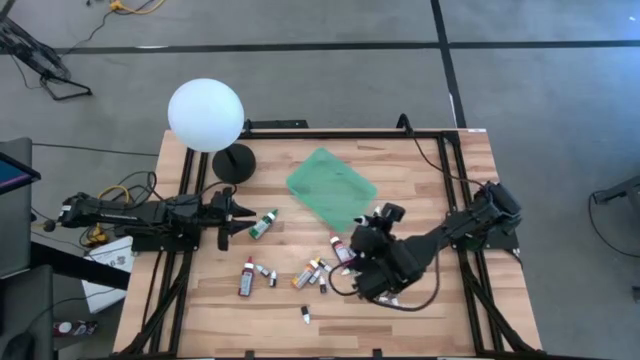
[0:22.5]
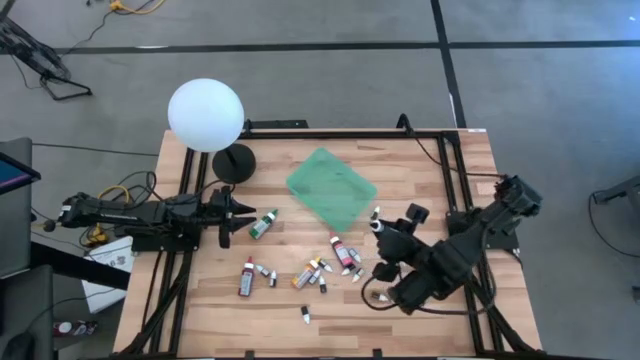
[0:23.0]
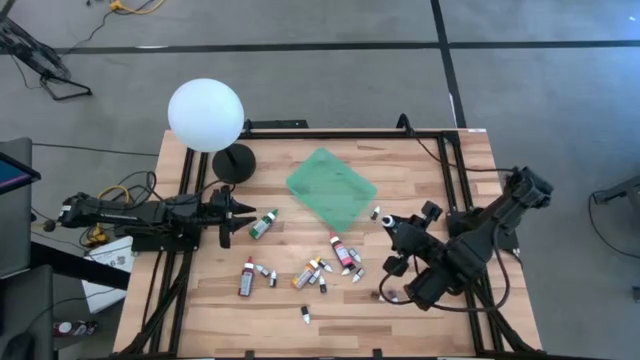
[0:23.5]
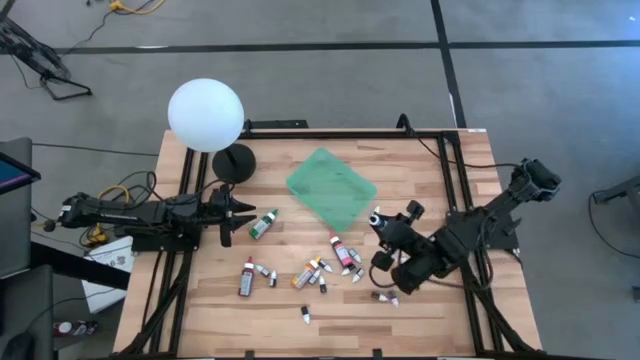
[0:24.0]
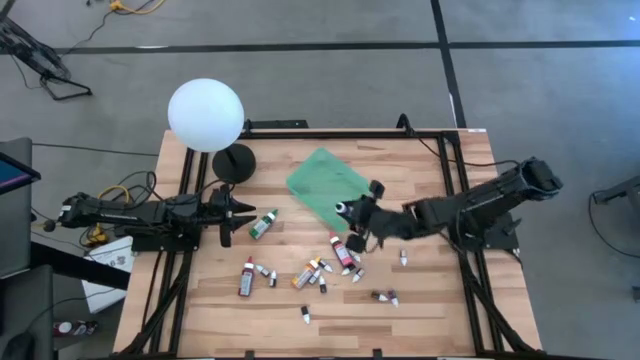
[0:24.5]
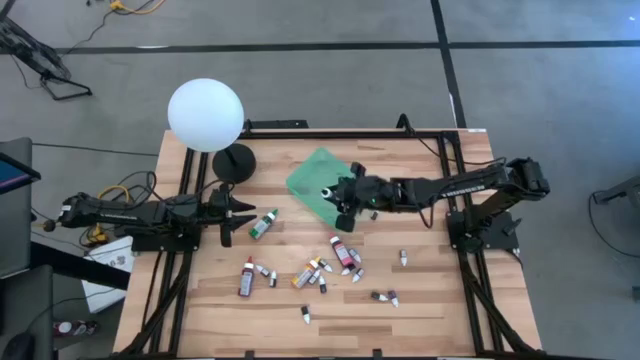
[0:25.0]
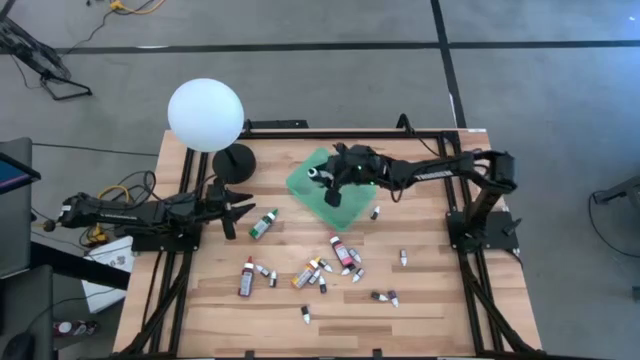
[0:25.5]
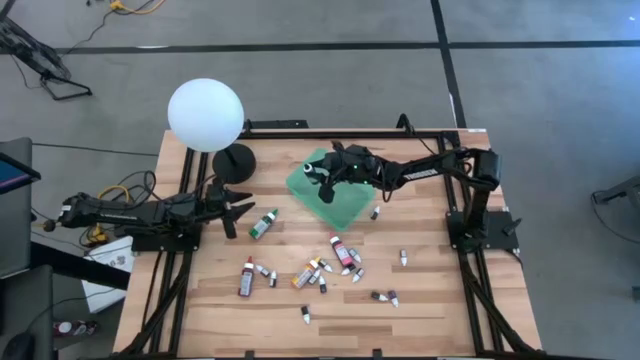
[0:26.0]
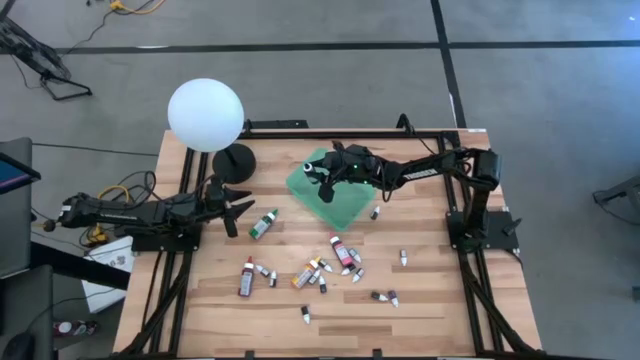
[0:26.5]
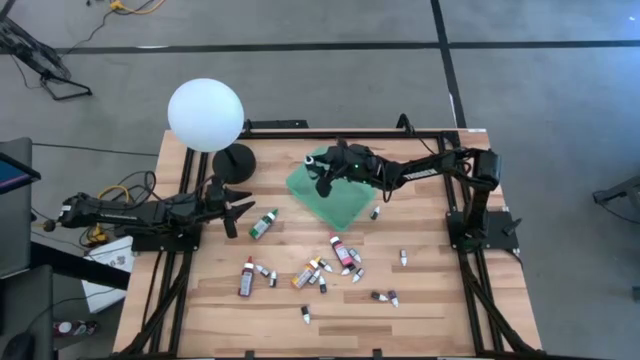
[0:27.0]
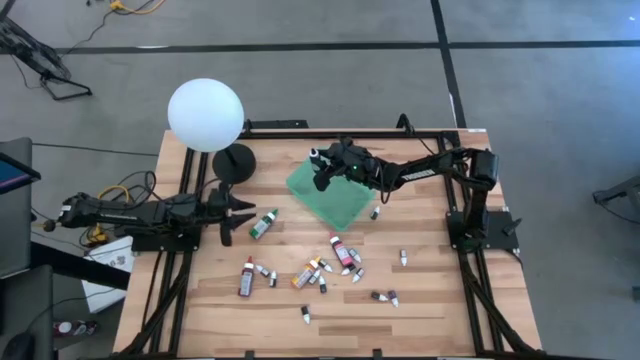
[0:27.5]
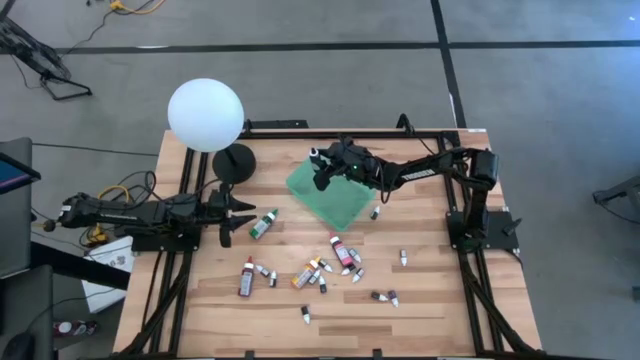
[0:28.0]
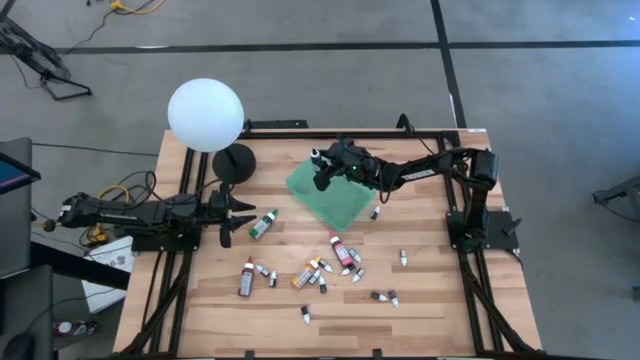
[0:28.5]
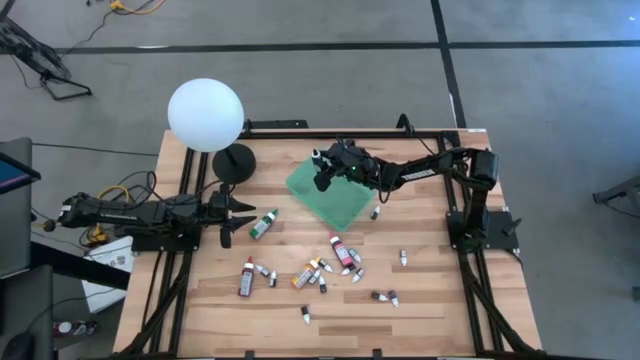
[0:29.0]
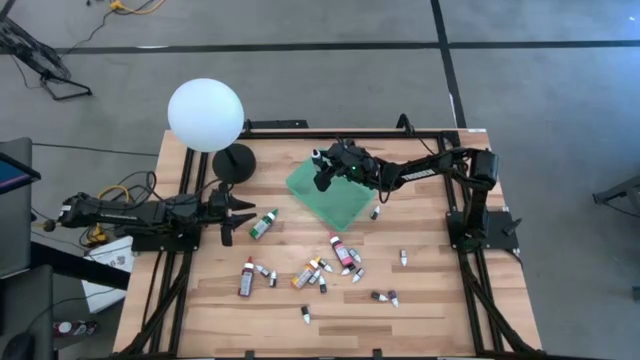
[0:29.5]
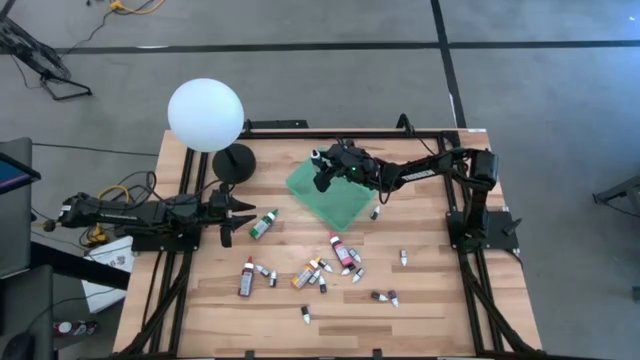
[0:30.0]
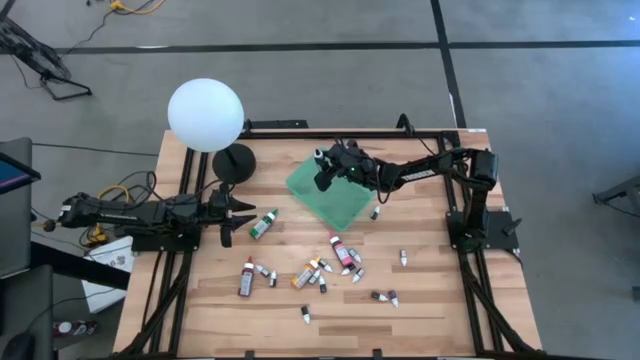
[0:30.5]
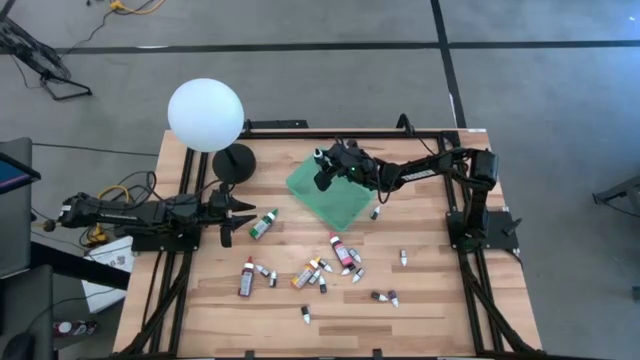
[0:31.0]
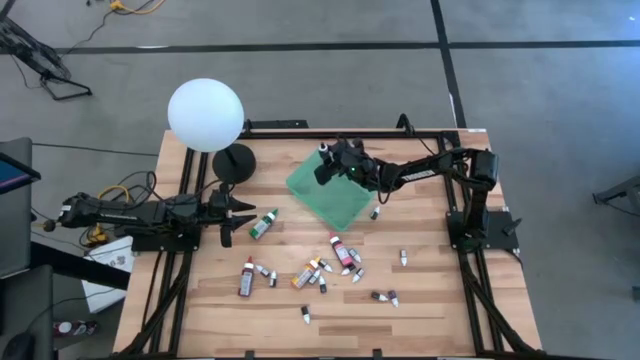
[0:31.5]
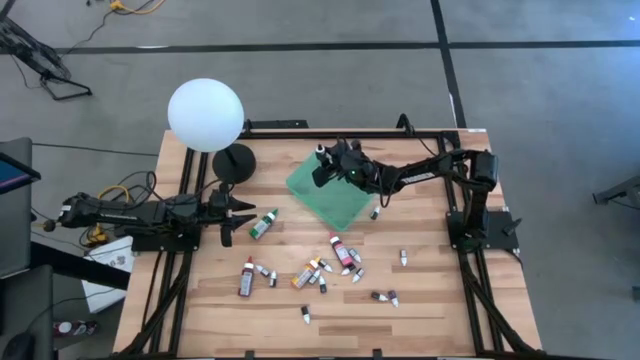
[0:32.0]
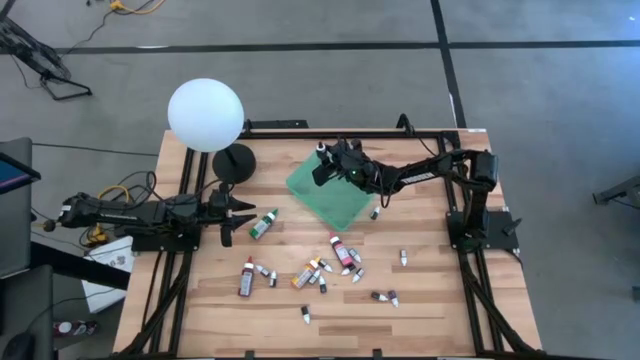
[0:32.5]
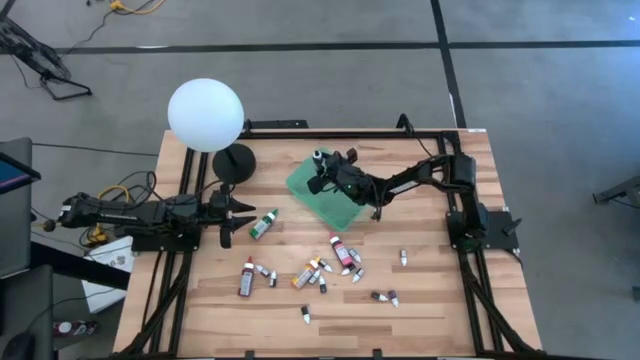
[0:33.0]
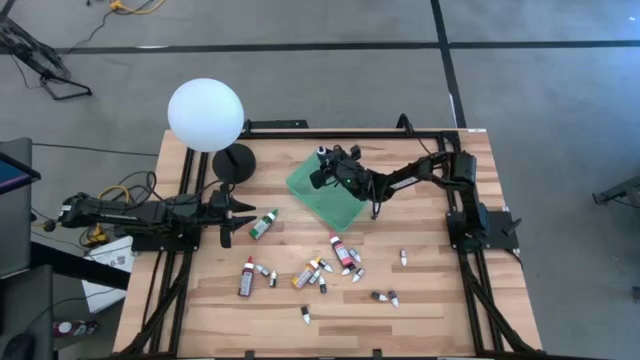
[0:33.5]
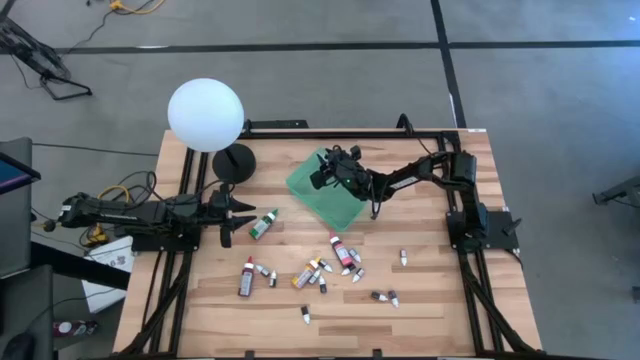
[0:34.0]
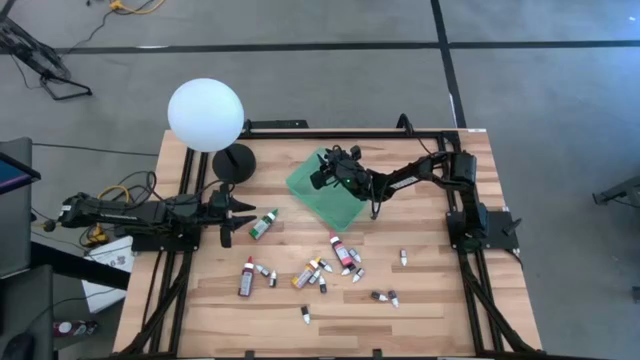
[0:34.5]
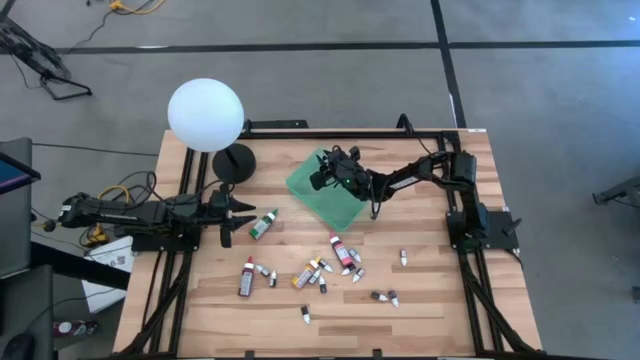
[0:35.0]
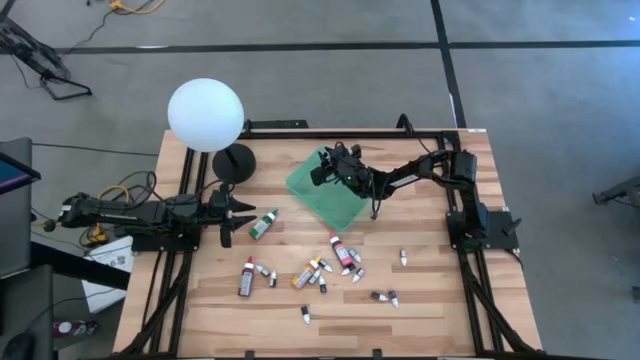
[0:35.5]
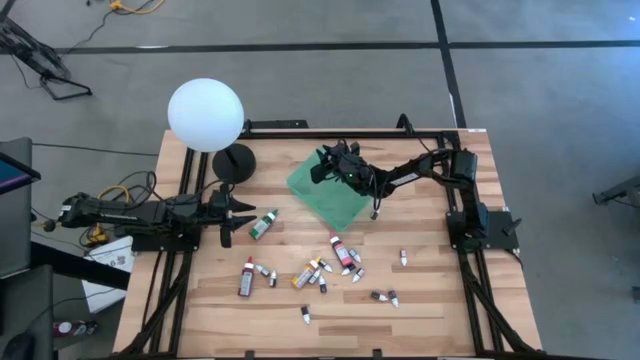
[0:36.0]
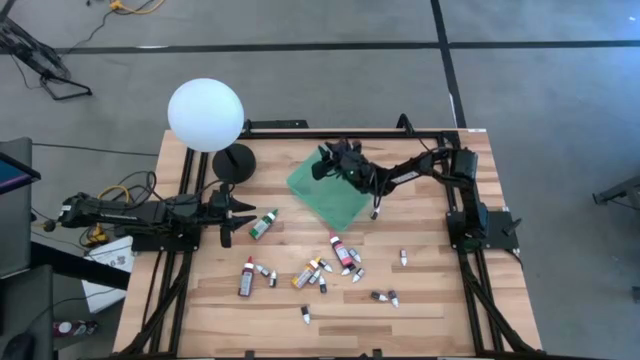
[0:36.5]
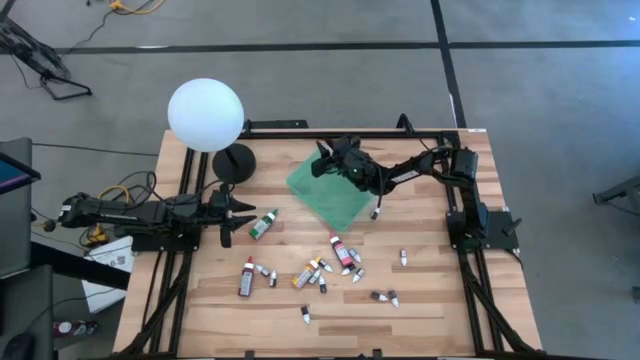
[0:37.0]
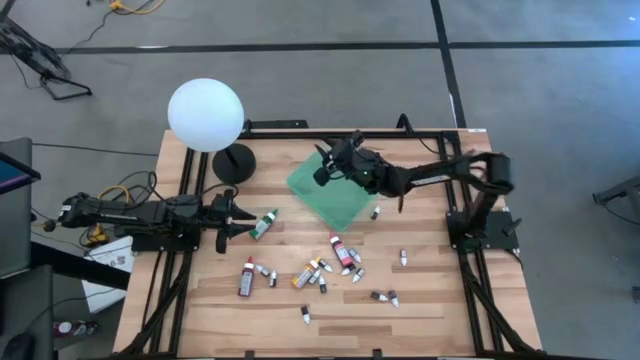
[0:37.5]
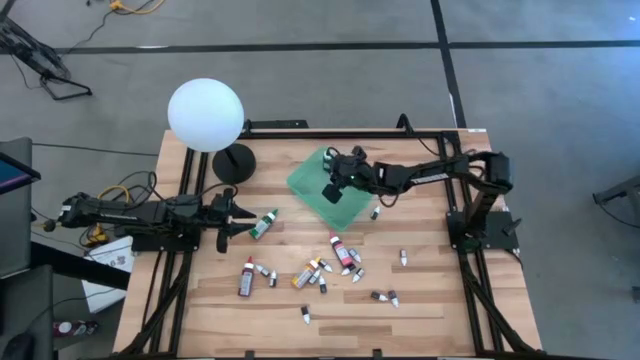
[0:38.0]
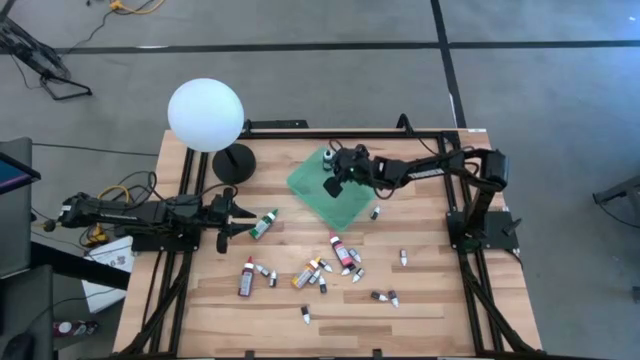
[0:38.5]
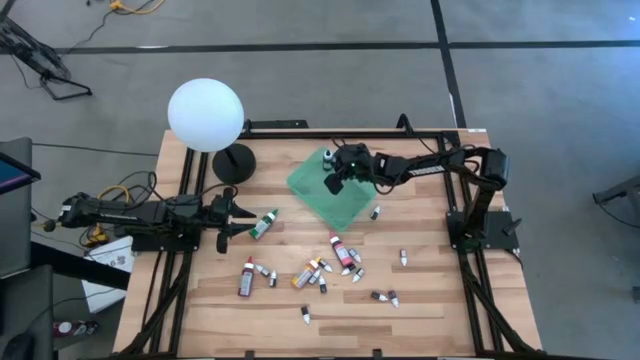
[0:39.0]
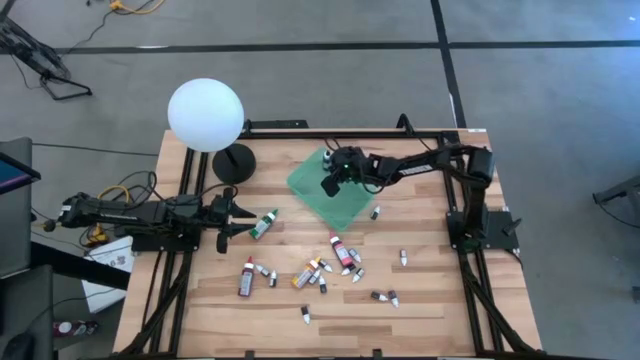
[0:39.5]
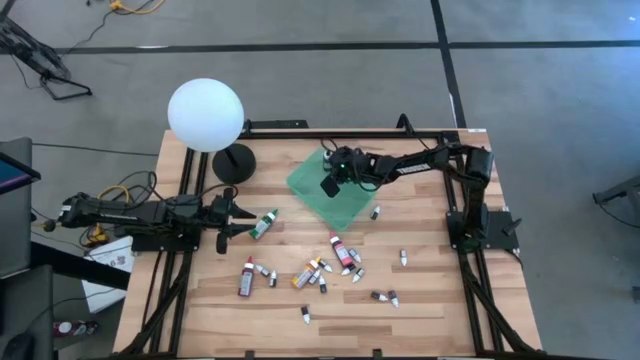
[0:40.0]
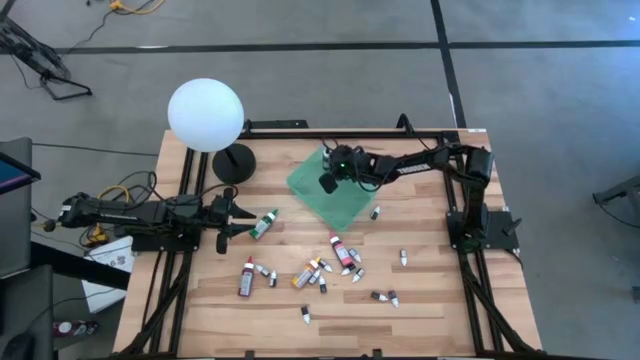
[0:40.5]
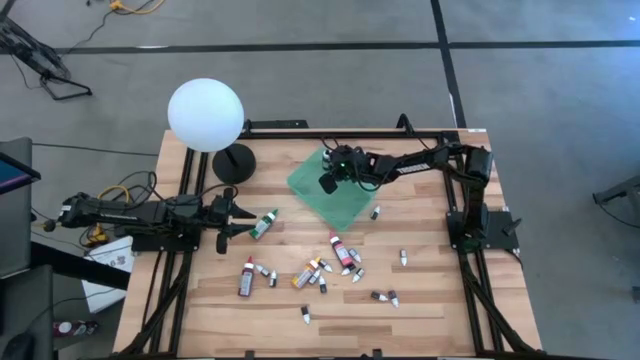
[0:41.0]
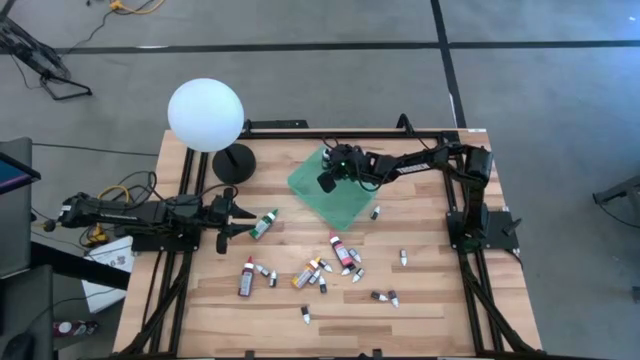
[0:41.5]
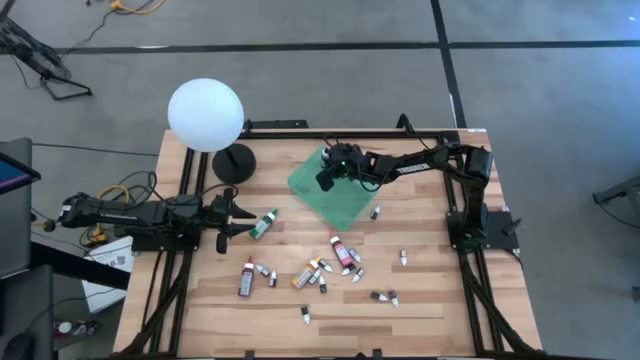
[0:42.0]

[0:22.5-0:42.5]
Task: Pick & Place food coloring
Put the large black food coloring bottle into the green bin

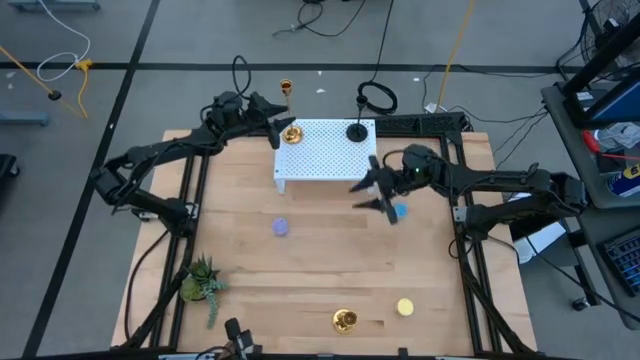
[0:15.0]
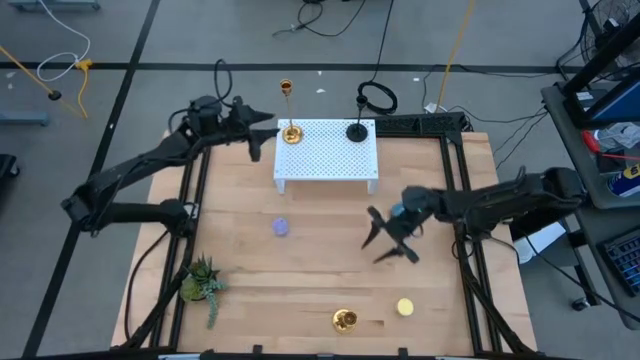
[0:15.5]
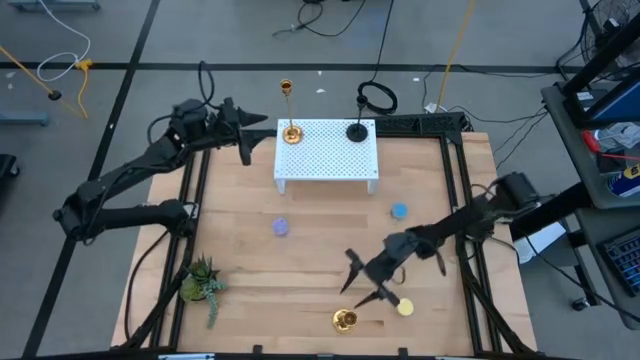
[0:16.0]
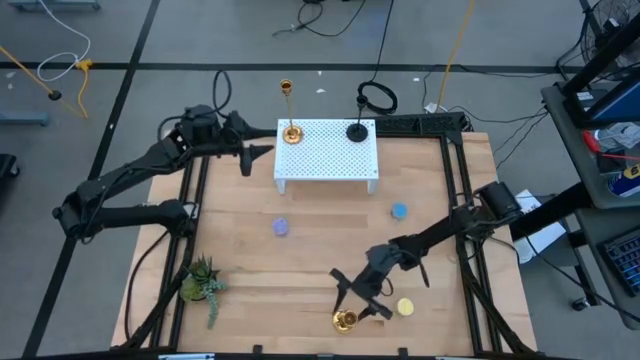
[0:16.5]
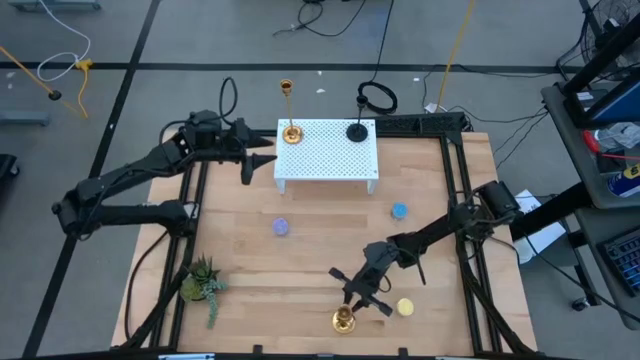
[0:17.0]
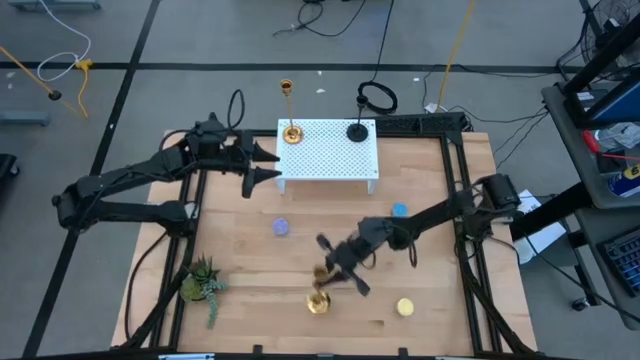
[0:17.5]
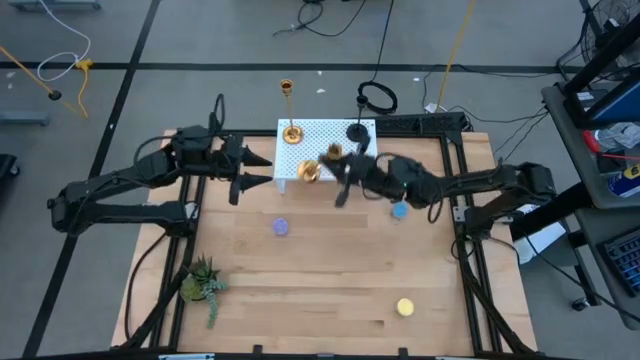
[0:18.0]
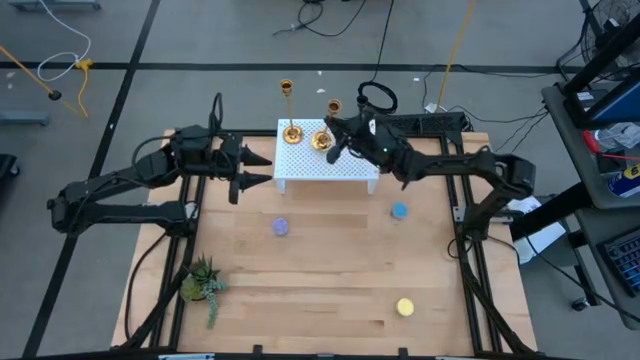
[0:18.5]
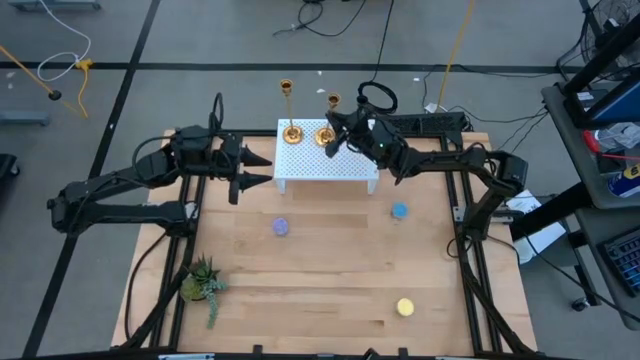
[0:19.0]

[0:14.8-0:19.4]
Task: Pick & Place candle stick holders
Put the gold candle holder on the shelf
